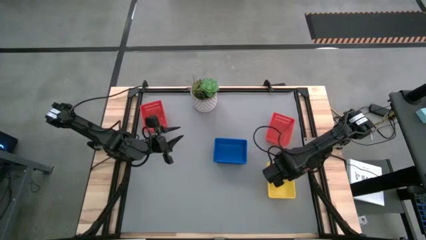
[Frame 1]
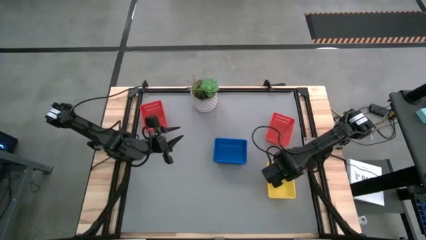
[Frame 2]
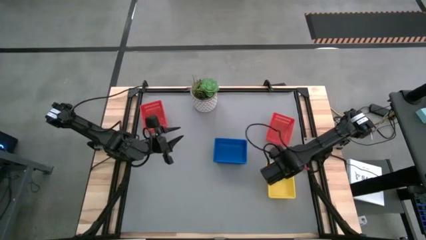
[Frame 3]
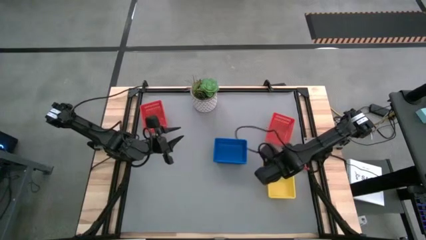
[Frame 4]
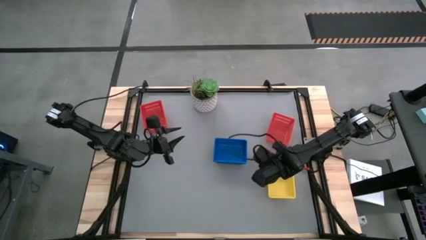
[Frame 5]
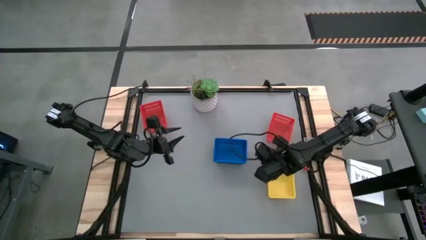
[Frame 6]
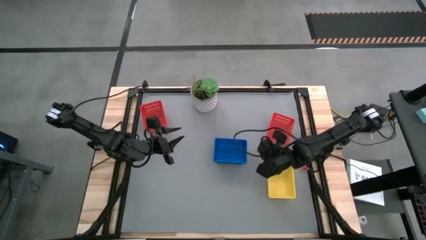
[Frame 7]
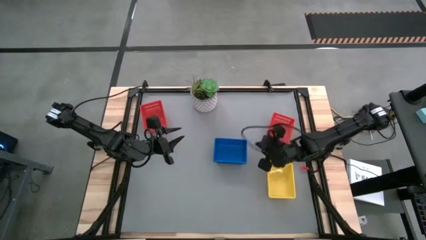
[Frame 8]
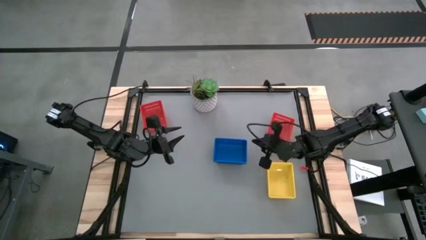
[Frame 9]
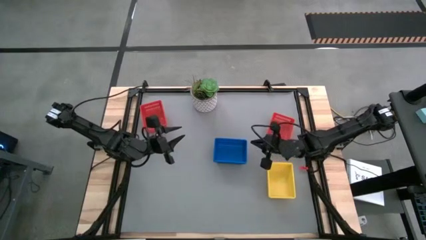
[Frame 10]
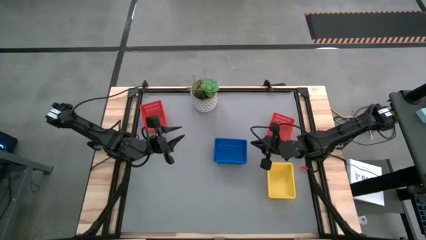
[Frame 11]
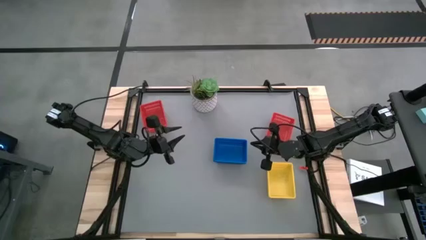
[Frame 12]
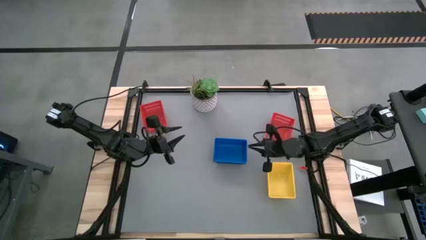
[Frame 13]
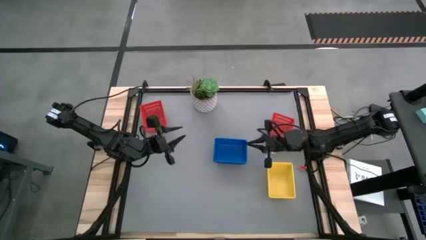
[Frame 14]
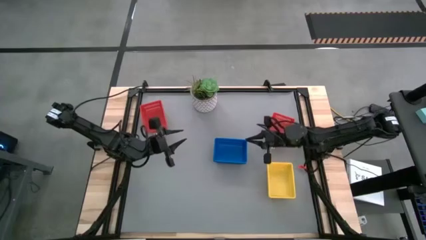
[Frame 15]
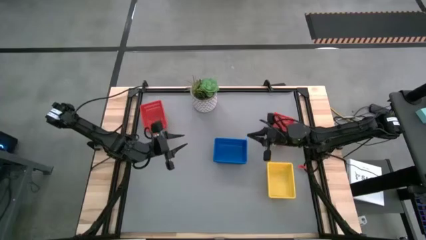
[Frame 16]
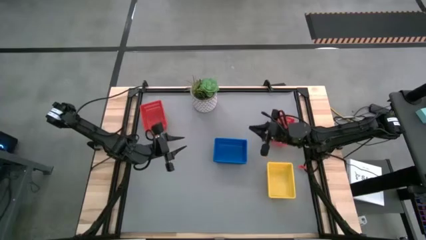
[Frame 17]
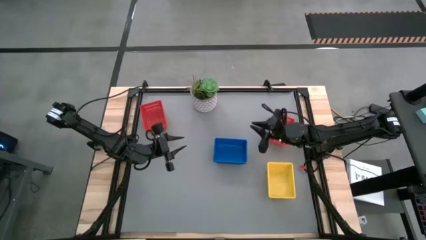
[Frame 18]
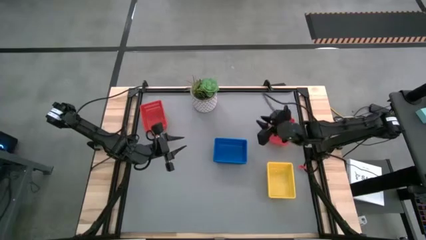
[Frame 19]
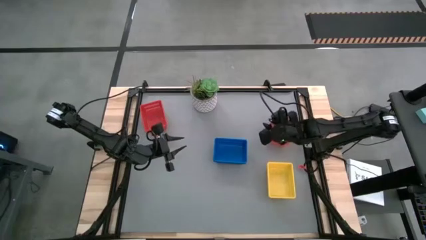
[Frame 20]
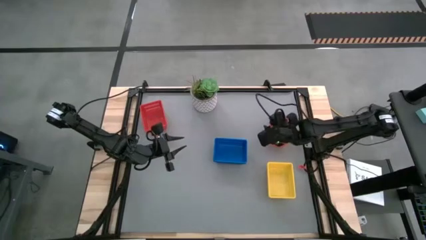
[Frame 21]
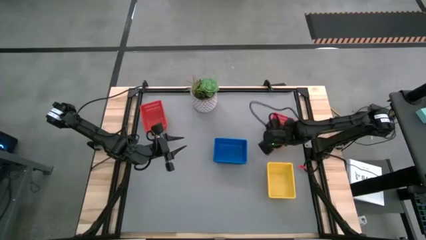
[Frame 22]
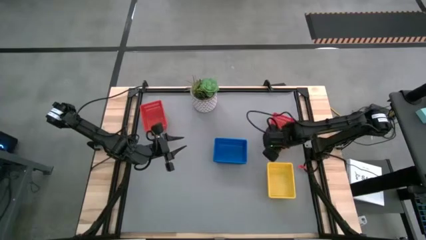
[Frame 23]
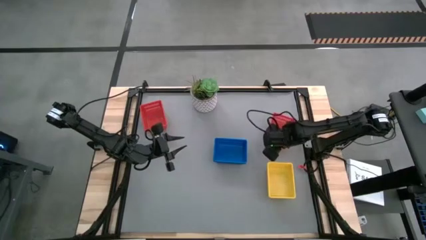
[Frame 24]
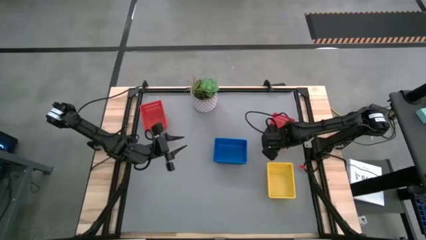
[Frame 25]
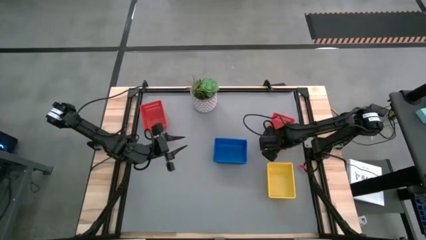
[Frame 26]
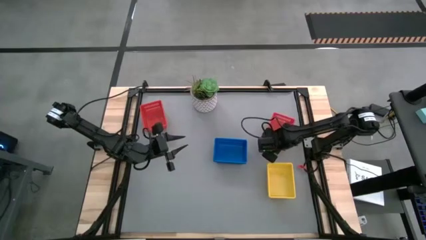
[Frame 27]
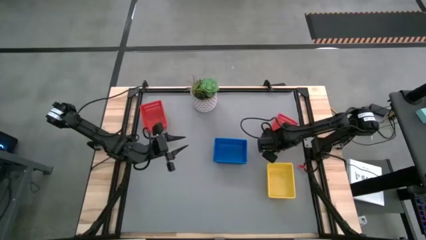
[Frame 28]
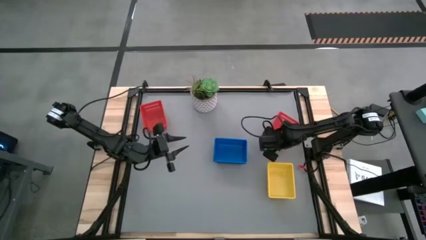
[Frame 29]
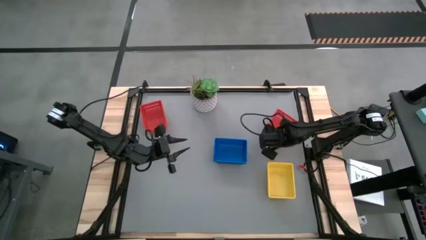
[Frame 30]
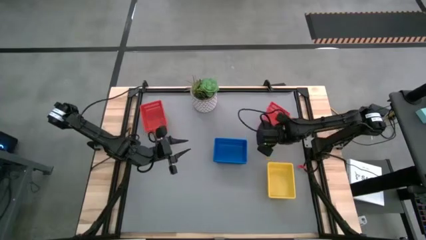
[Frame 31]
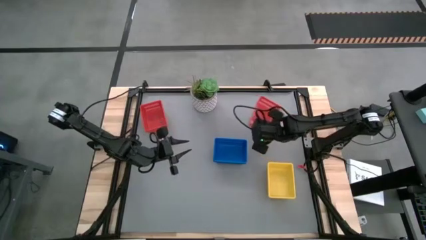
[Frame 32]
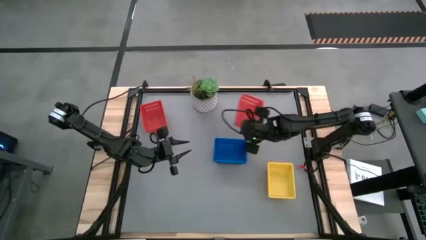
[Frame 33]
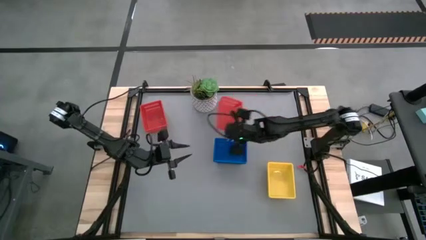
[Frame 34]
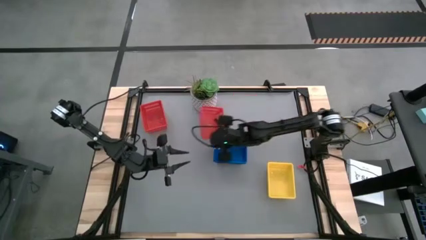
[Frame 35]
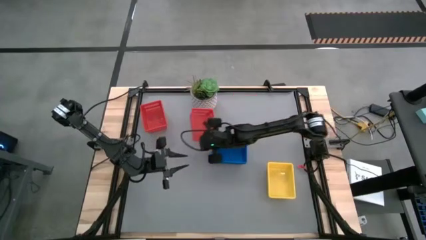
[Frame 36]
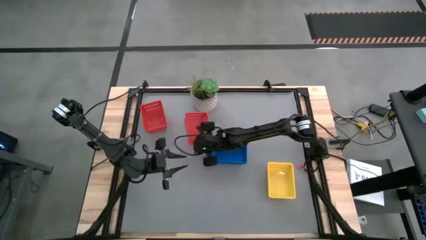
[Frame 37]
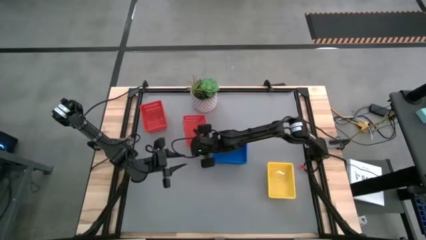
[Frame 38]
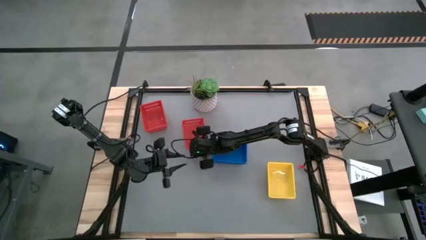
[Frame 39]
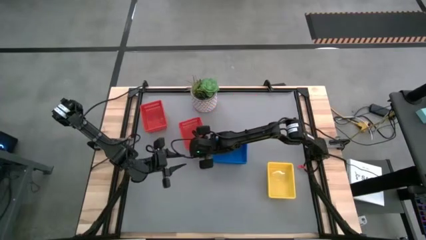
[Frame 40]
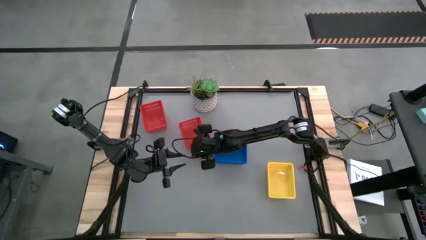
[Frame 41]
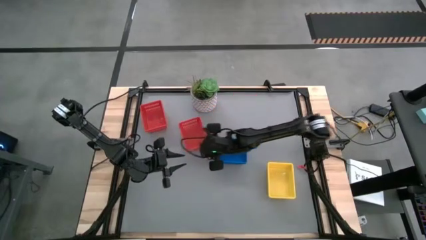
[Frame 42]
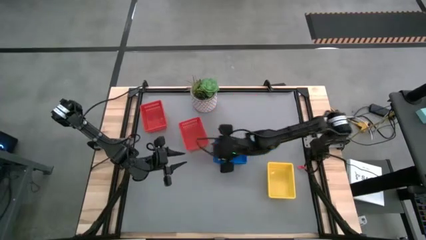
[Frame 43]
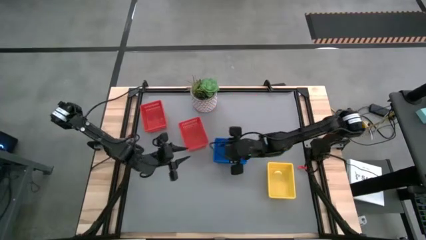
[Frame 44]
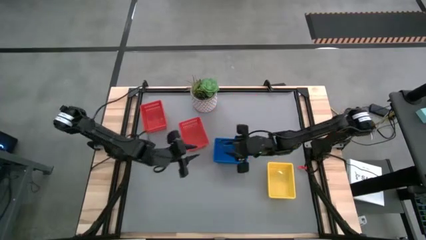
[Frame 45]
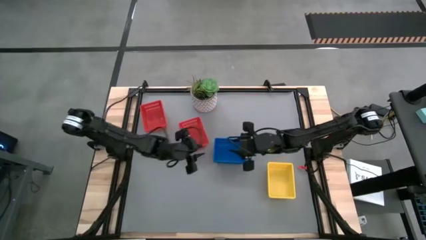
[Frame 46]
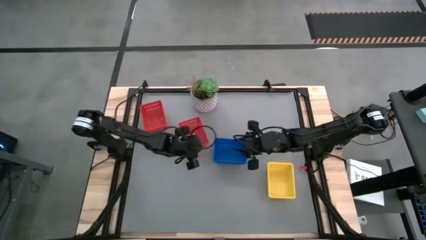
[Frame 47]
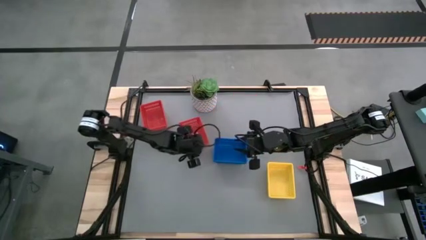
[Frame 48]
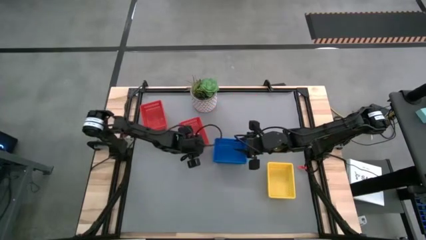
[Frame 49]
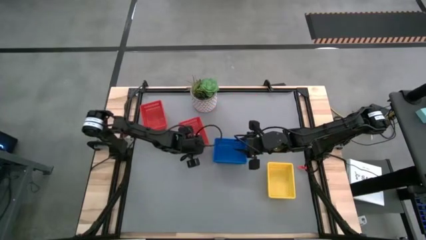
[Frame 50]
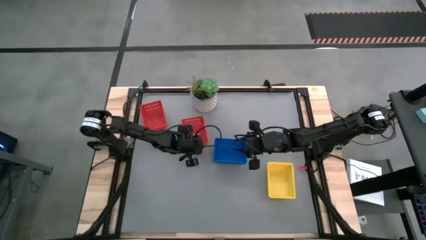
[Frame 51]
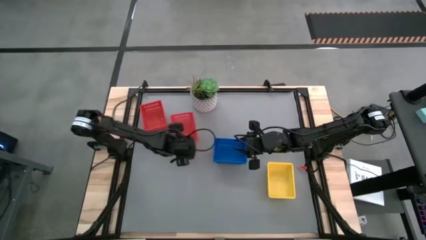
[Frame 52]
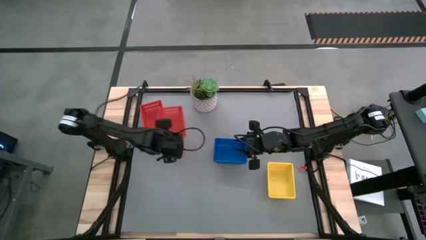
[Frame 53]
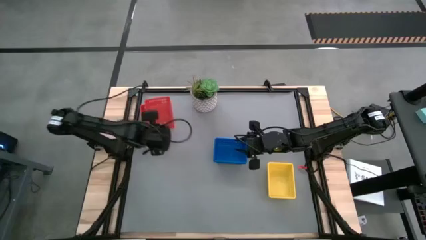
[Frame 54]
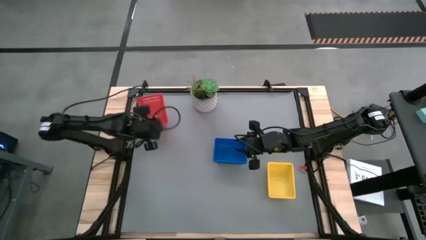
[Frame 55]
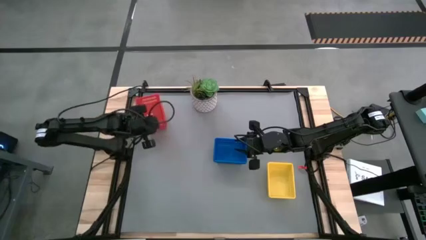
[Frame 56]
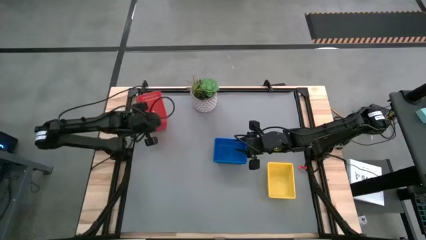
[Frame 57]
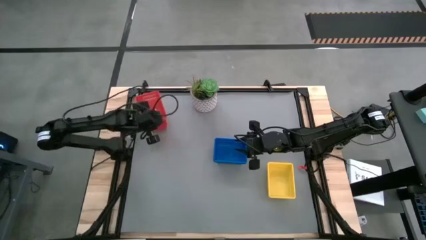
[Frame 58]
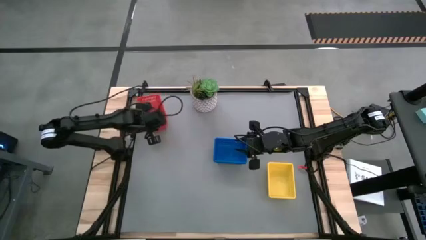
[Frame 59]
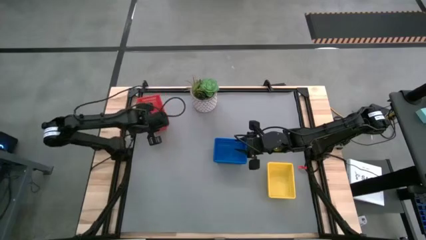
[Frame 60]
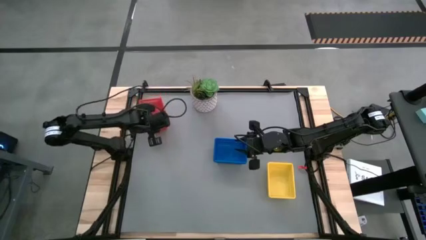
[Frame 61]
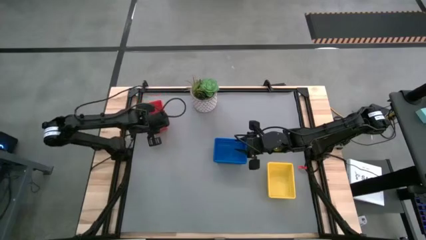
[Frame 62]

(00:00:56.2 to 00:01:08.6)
Stack the right red basket on the red baskets

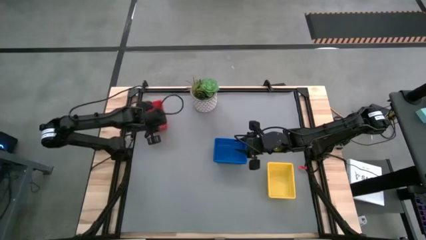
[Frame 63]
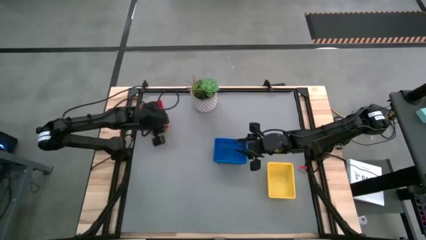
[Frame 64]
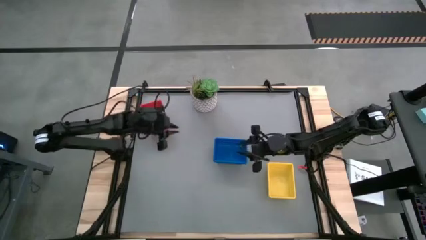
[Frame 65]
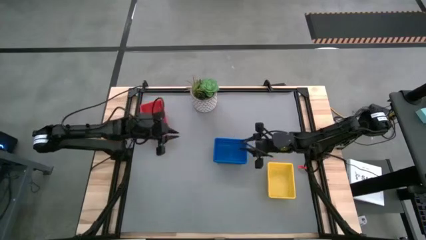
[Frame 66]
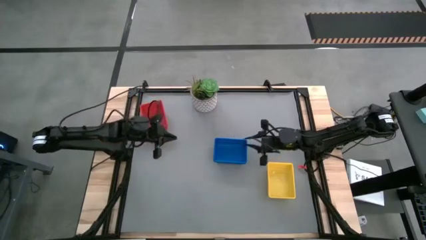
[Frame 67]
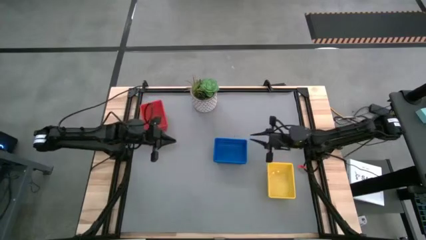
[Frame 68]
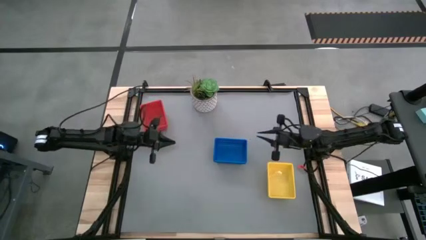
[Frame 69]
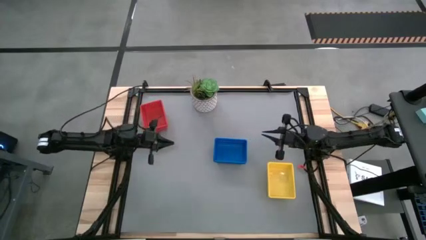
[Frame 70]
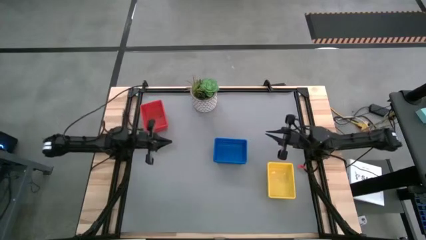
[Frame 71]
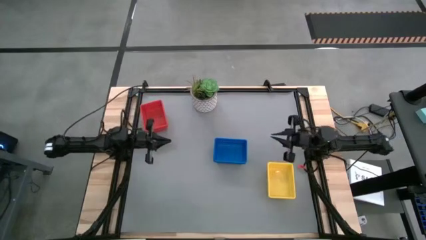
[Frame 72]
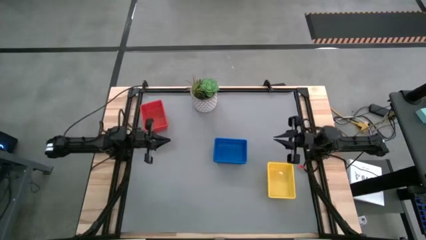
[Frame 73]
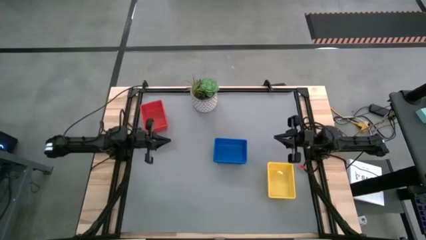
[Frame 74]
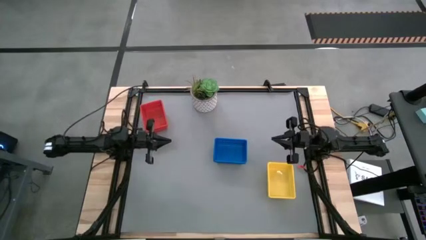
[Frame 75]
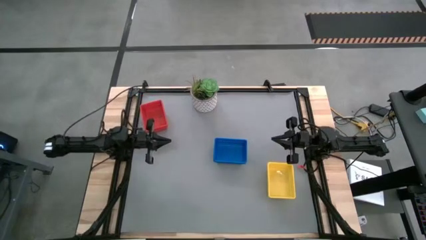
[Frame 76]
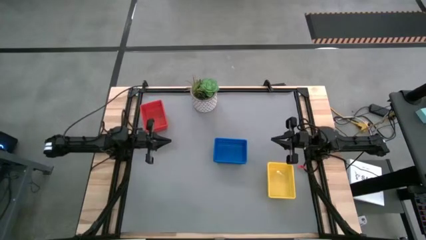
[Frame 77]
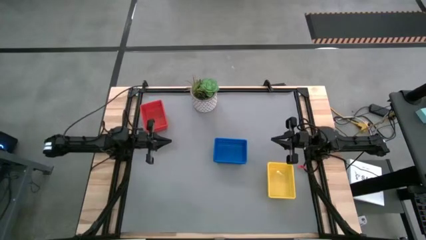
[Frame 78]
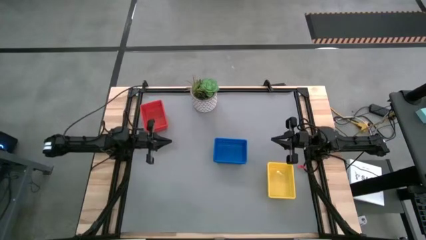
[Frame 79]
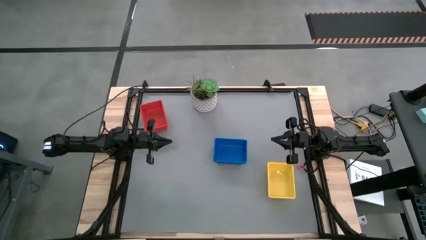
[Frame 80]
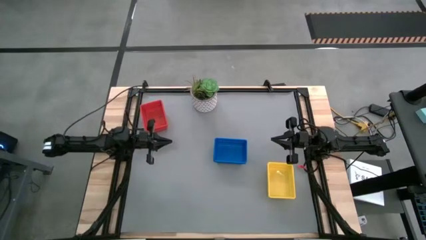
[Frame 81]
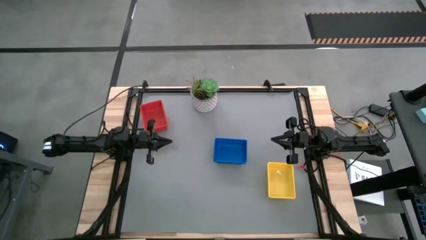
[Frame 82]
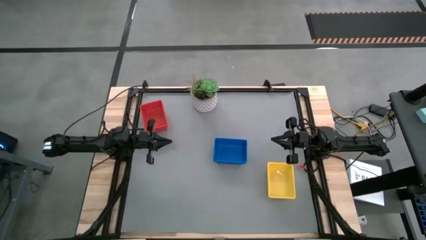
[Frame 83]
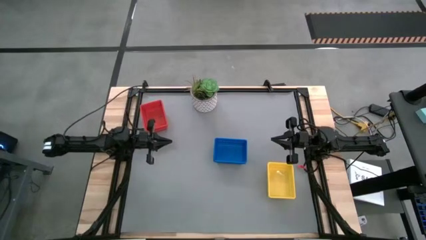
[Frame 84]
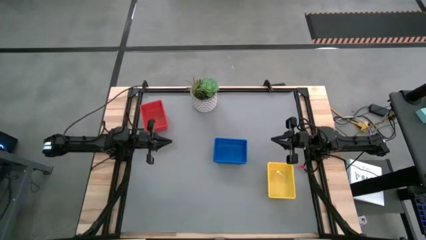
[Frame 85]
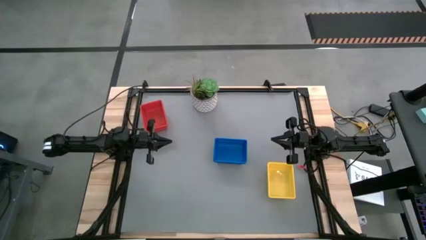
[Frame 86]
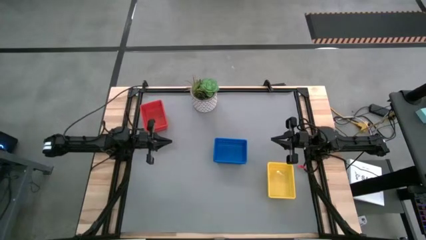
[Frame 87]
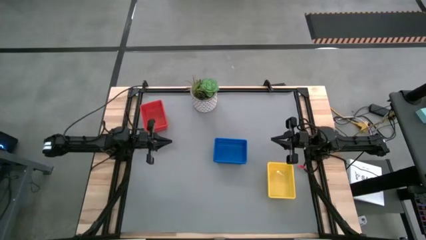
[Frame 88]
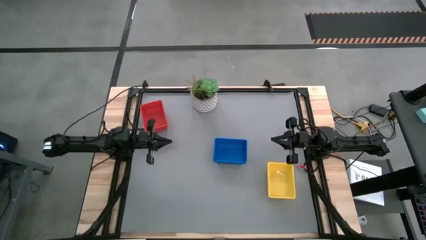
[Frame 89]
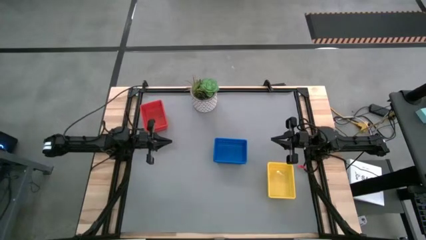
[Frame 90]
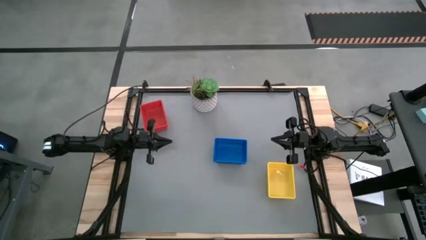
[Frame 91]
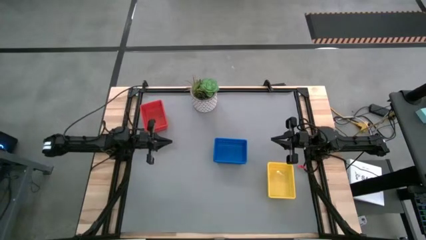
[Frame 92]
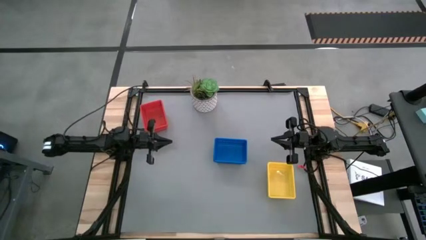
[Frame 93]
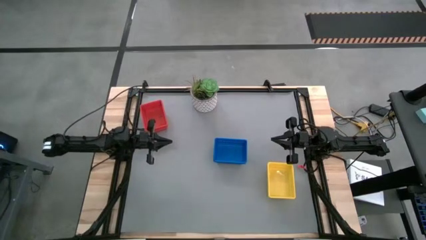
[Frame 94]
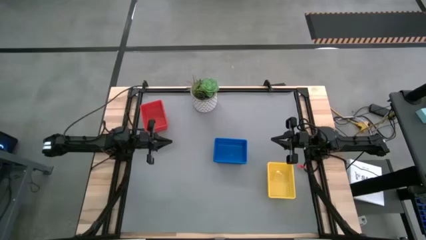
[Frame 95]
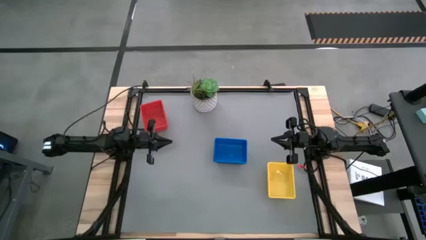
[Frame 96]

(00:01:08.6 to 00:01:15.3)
Return to Home Position
